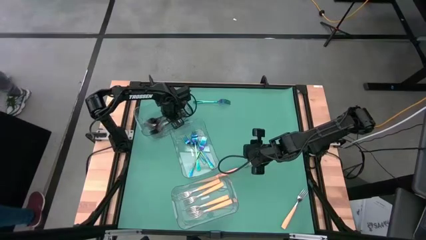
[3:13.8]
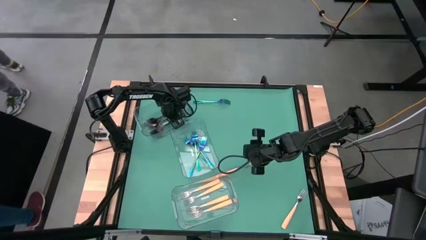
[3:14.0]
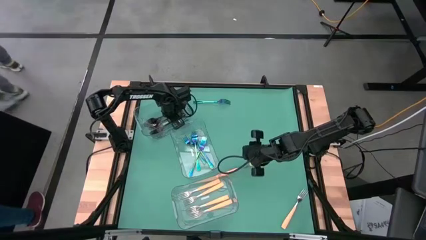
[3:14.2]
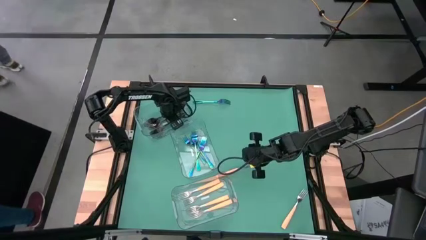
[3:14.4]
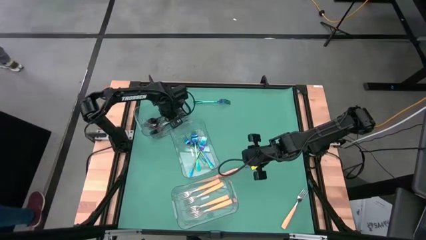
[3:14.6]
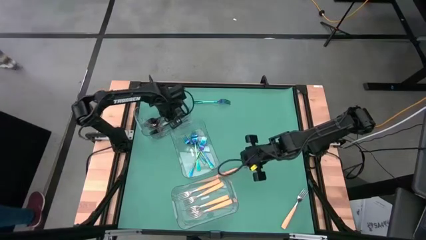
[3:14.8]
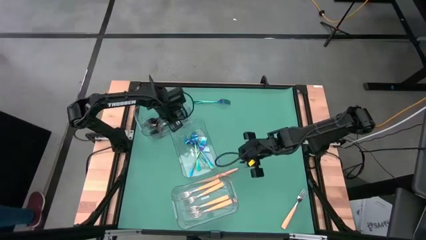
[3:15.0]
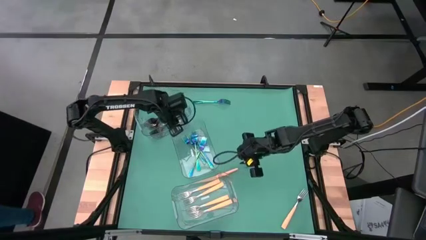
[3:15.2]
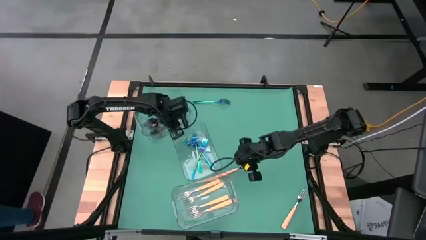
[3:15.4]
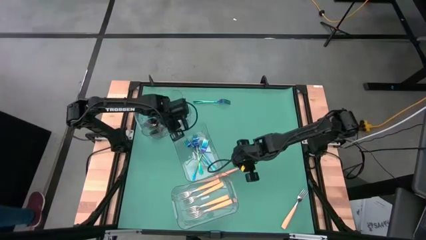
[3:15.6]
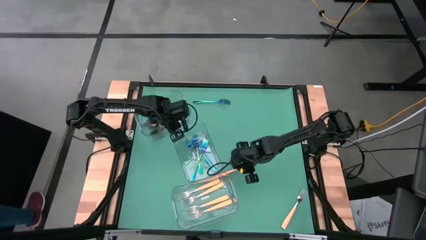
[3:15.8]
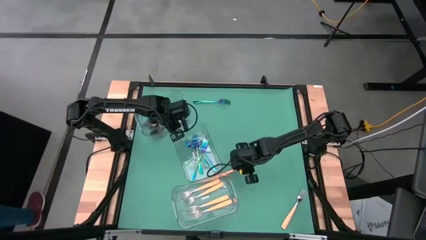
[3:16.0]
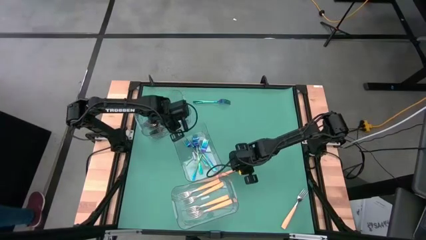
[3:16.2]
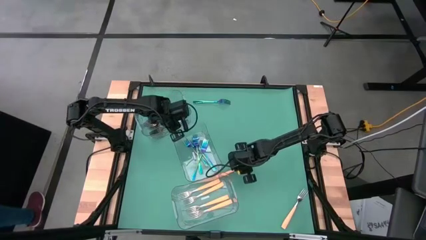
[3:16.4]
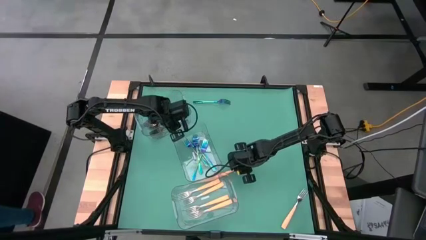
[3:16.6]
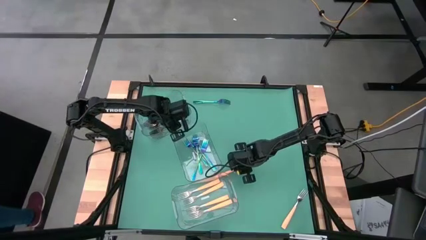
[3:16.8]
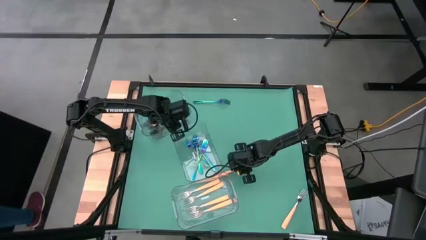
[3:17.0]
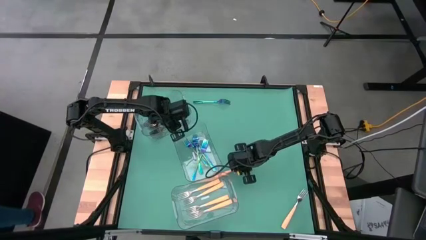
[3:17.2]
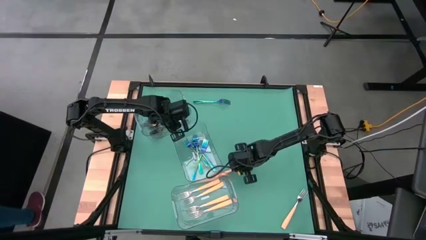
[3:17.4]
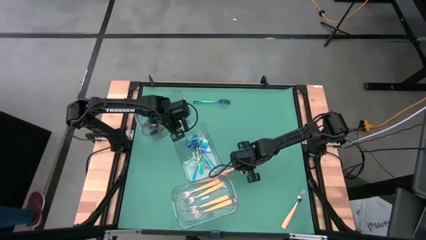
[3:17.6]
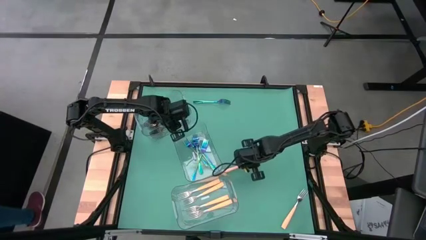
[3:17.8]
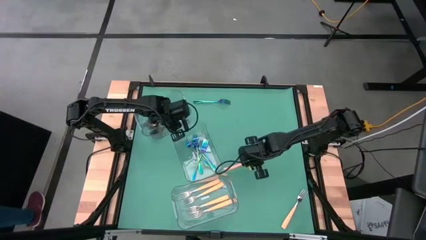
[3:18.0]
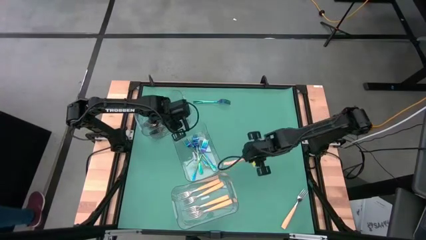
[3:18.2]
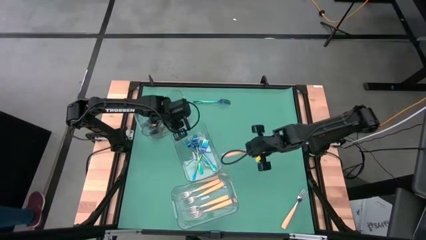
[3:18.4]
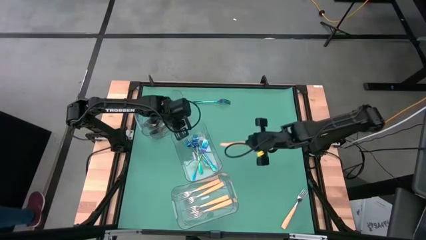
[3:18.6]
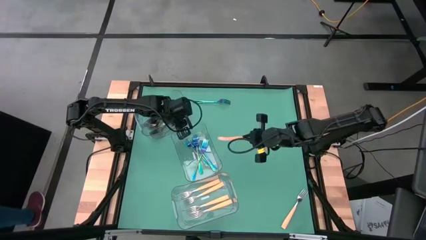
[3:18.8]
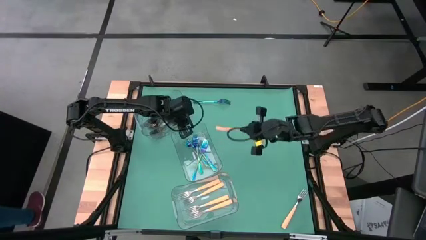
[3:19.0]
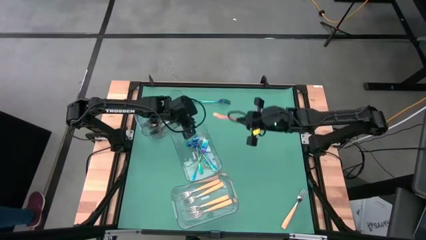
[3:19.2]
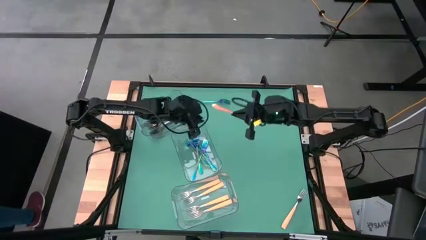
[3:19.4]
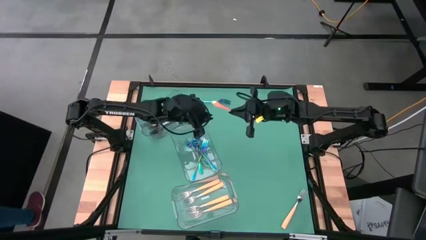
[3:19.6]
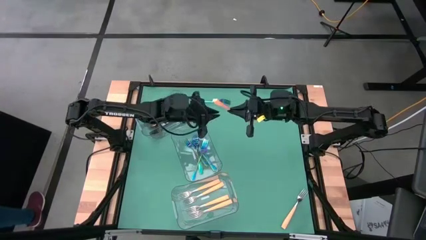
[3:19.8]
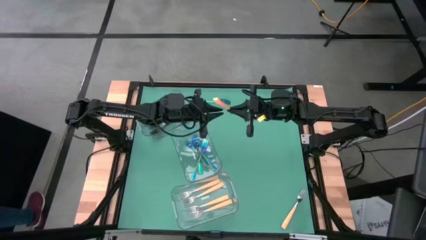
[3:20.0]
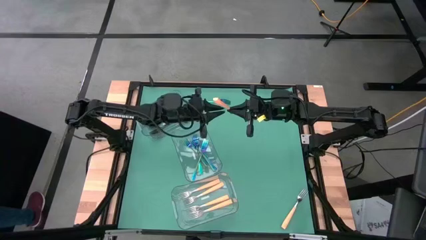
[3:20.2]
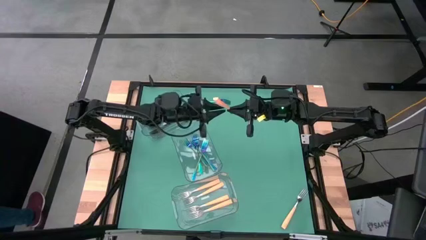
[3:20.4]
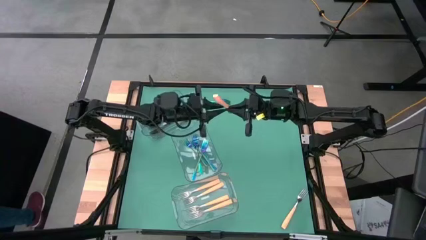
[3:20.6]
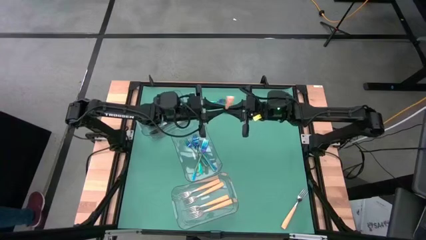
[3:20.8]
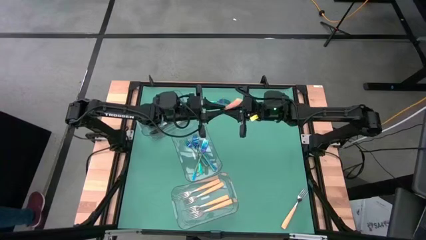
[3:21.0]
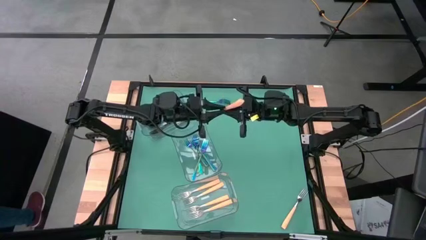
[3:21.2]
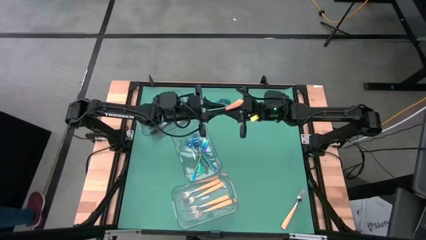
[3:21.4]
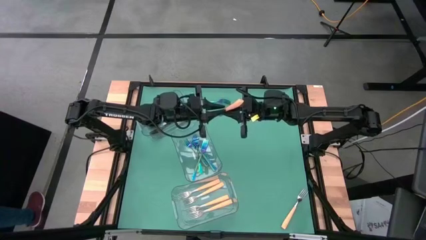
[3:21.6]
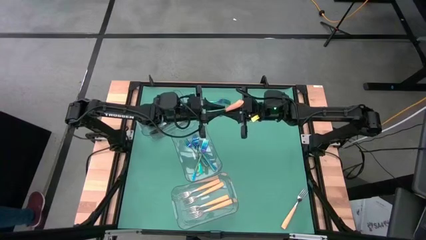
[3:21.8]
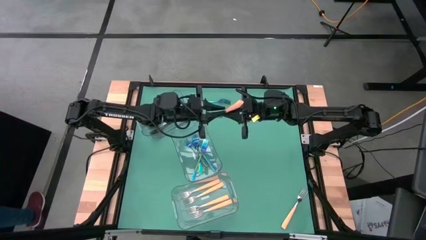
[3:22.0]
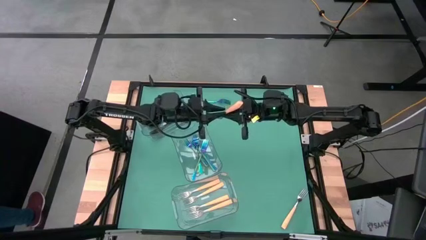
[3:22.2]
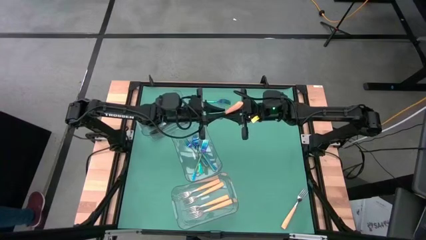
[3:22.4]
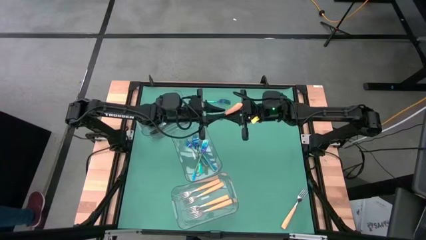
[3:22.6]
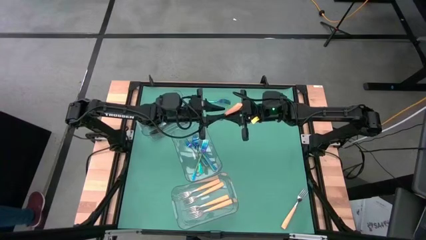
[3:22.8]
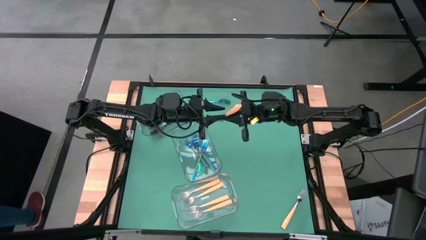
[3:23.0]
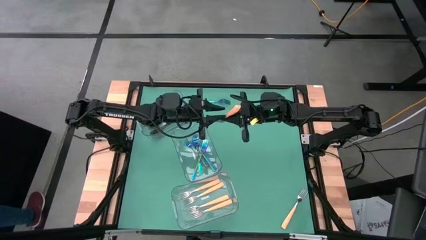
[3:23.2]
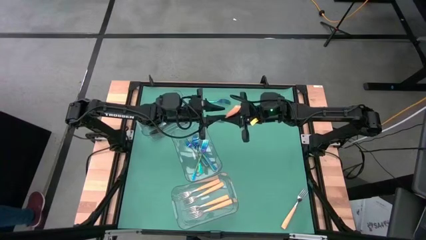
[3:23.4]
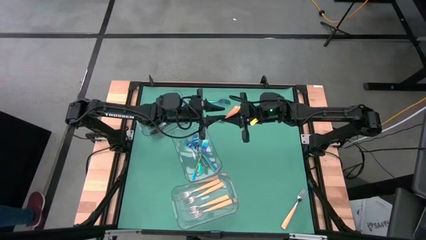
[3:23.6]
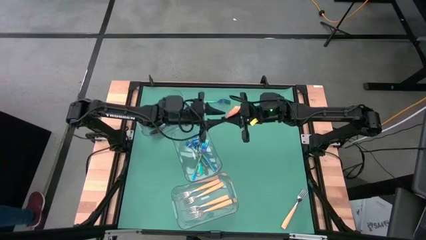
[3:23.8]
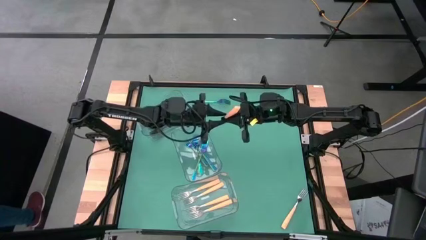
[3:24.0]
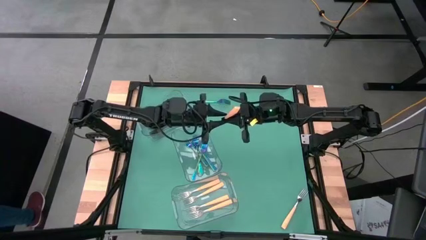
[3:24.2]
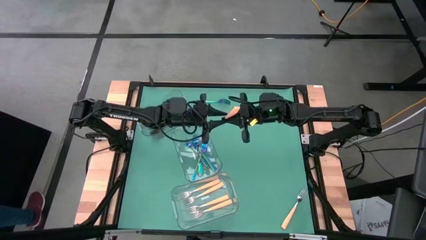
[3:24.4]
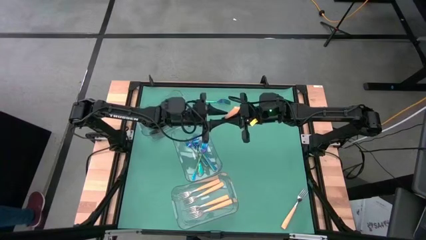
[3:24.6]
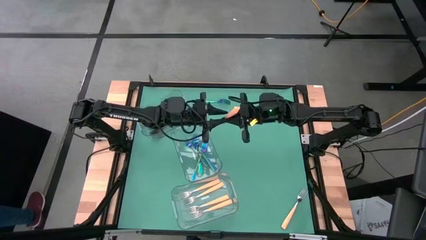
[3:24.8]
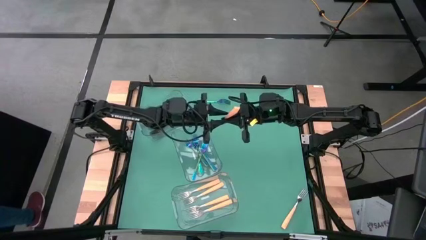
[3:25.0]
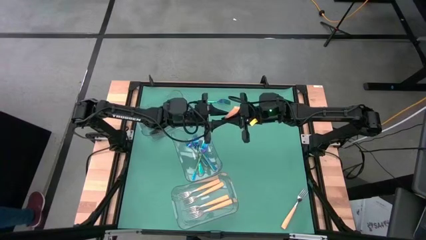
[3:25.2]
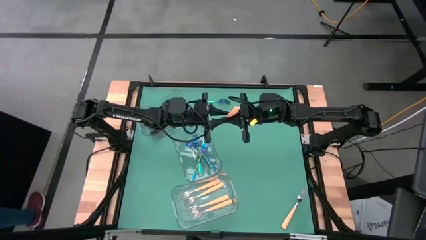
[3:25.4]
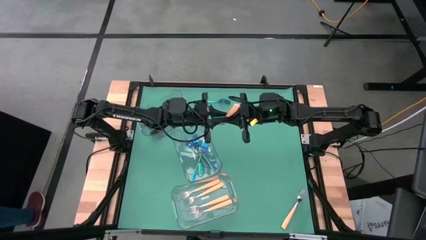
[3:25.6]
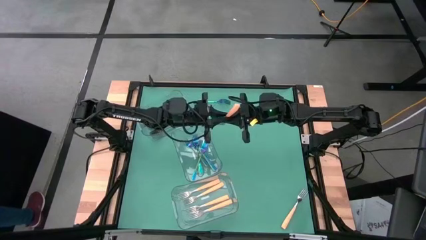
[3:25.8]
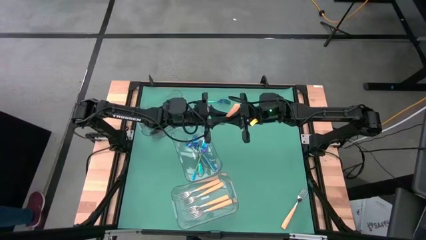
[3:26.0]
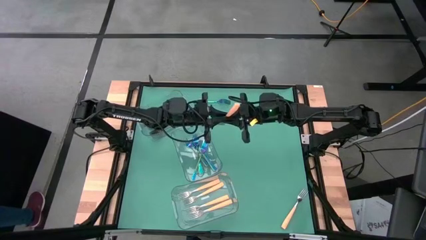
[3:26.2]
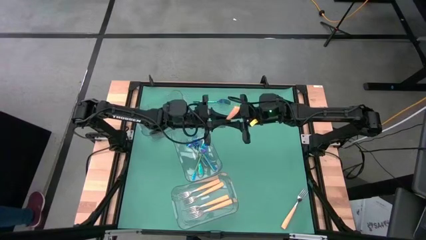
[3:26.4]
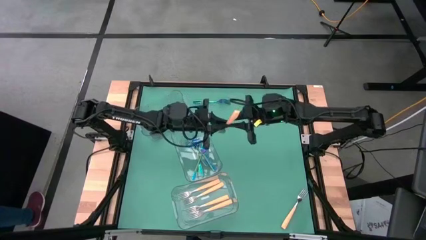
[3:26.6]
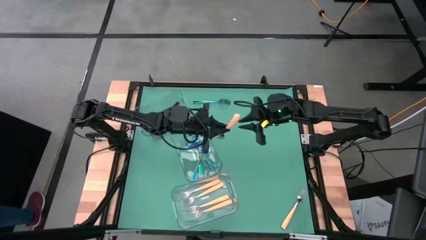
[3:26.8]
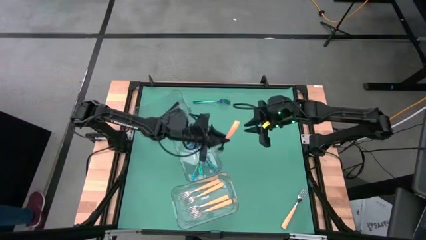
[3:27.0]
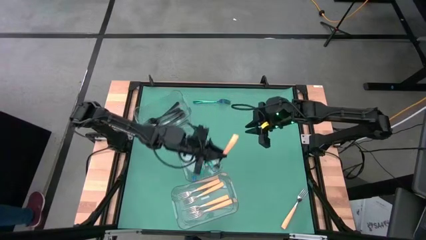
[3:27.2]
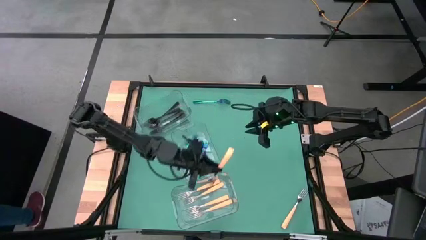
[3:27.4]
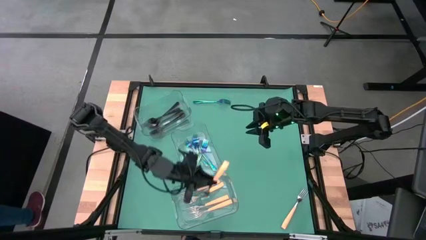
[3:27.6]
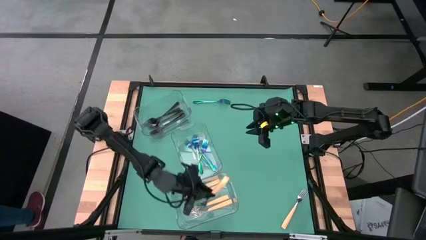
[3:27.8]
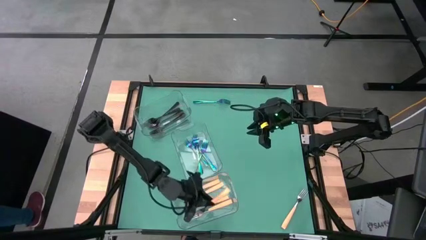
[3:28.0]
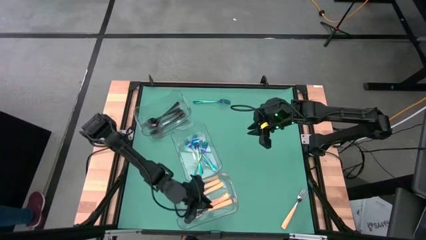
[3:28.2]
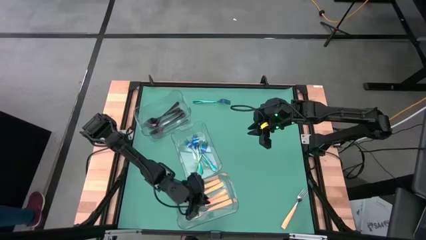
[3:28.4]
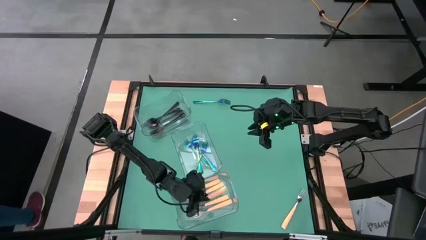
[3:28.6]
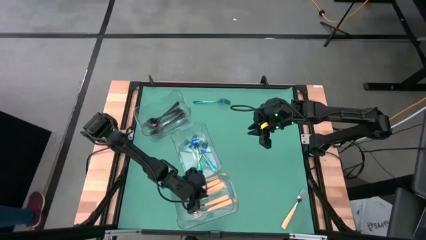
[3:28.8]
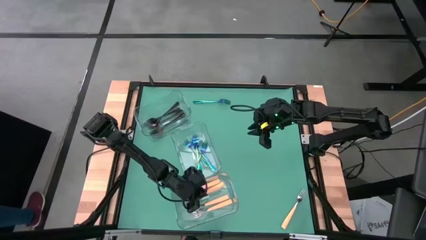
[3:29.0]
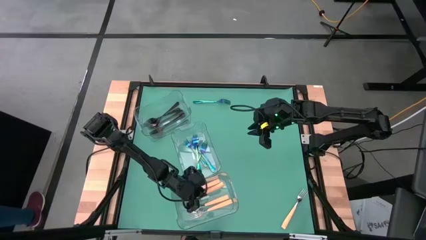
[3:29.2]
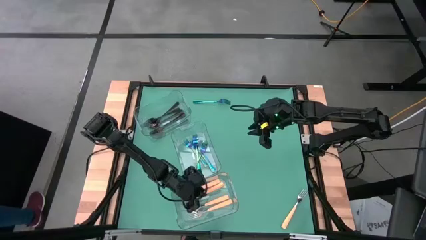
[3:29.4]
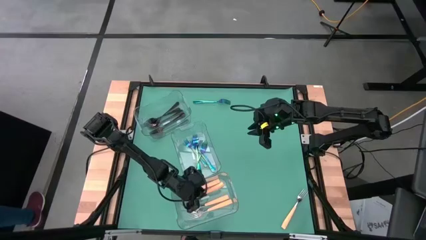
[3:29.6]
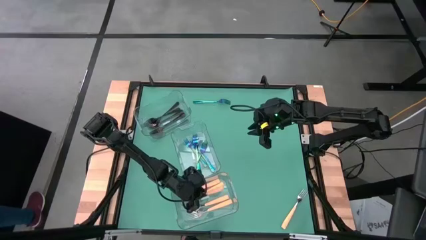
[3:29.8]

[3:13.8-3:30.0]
Task: Sort silverware by color (type)
Put the yellow fork into the bottom transparent bin

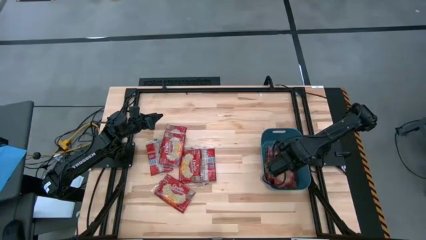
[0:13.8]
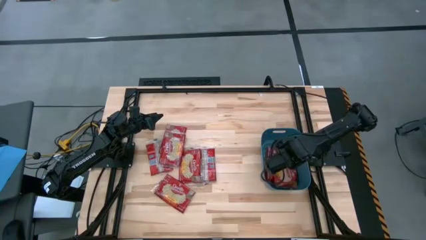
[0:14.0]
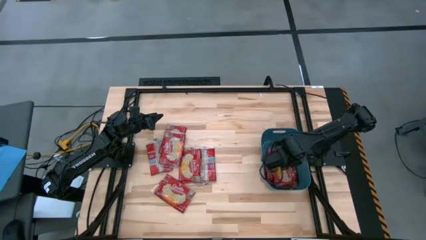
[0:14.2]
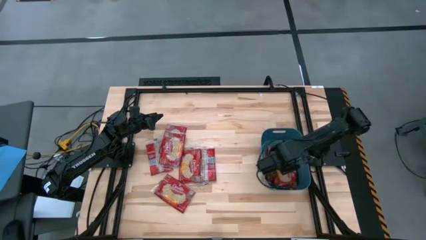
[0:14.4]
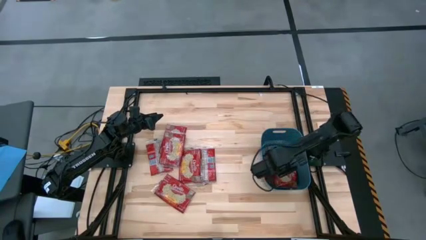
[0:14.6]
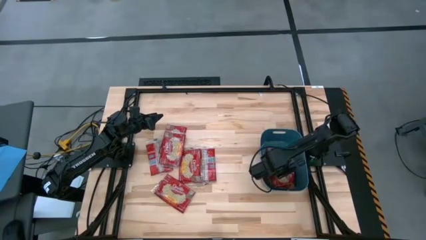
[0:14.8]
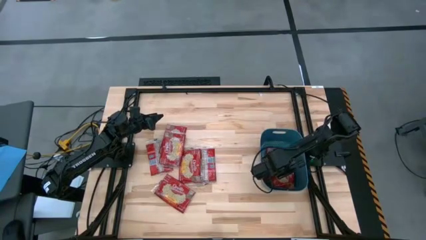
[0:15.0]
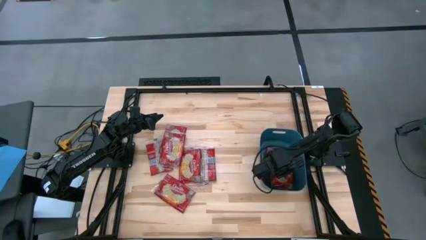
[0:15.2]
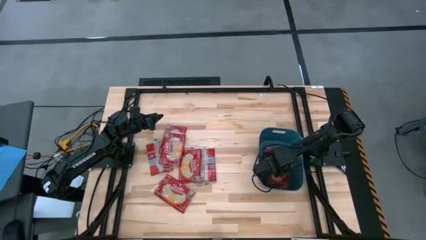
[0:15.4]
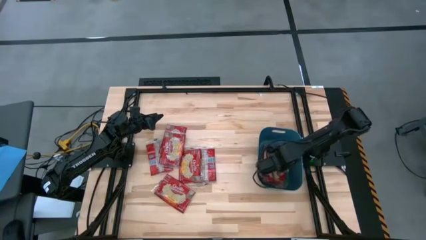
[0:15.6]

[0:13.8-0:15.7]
Task: Sort popcorn bags into baskets
Adjust the popcorn bag in the blue bin

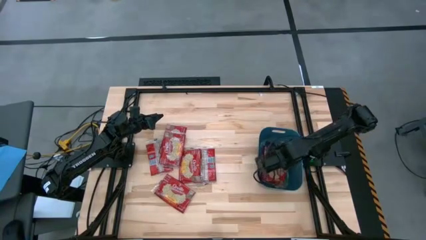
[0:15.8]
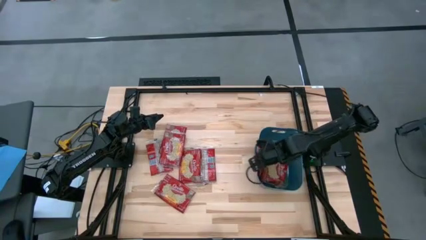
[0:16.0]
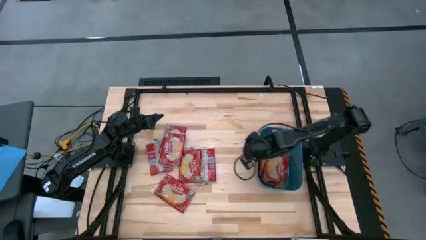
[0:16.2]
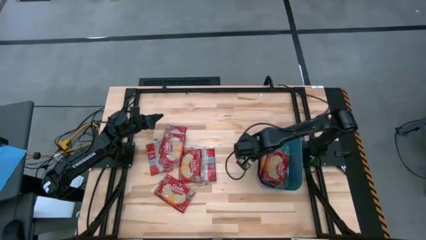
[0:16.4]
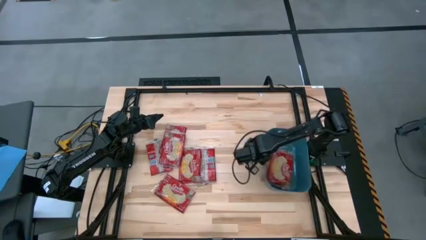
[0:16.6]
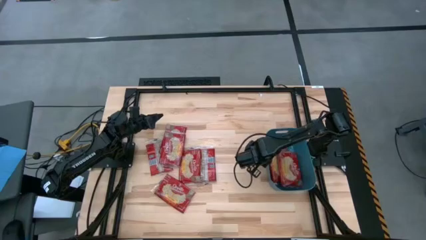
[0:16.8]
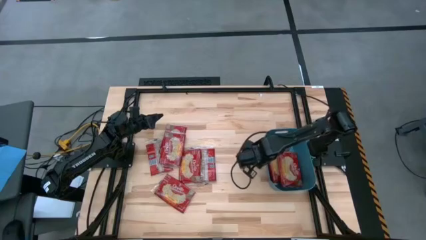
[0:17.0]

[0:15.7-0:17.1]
Adjust the blue bin
